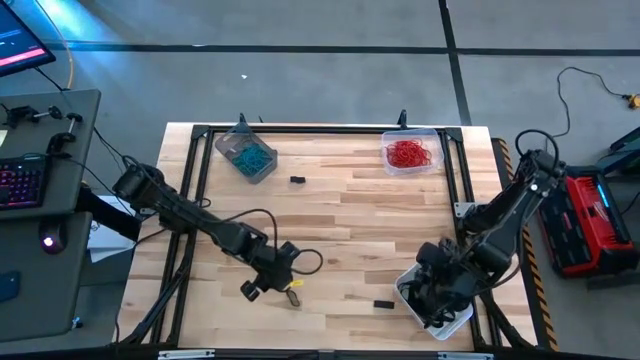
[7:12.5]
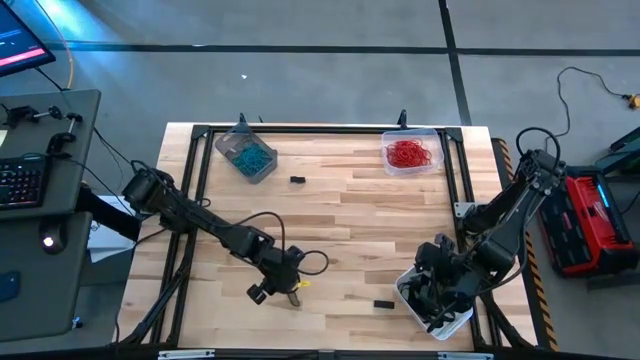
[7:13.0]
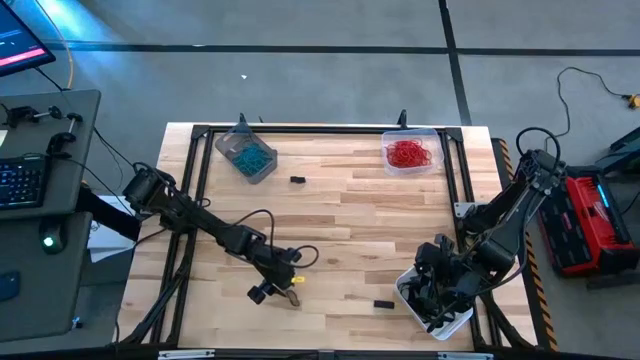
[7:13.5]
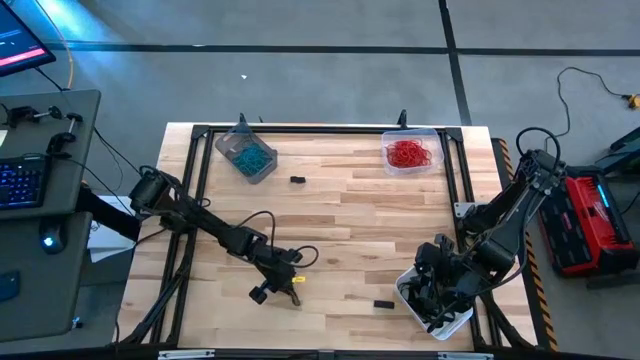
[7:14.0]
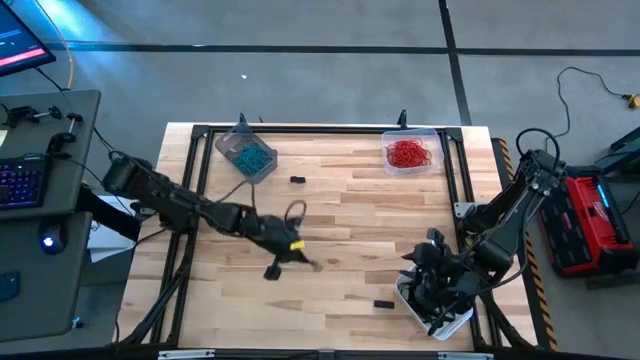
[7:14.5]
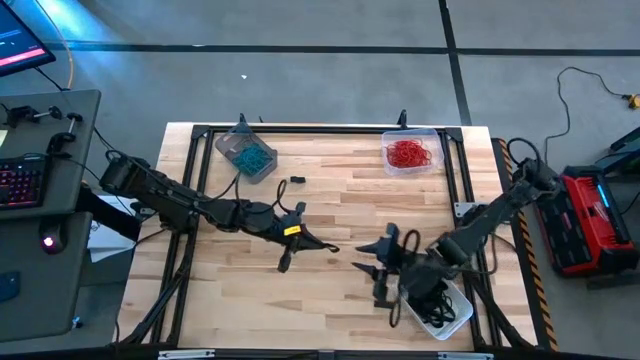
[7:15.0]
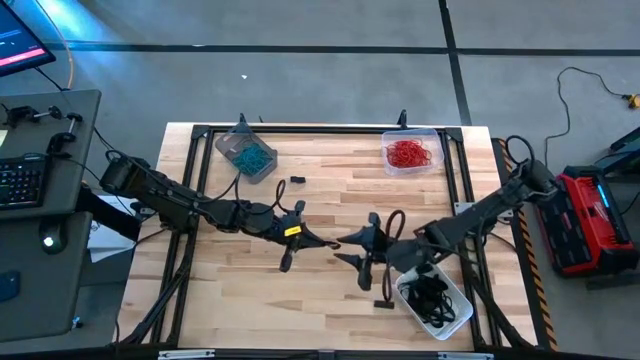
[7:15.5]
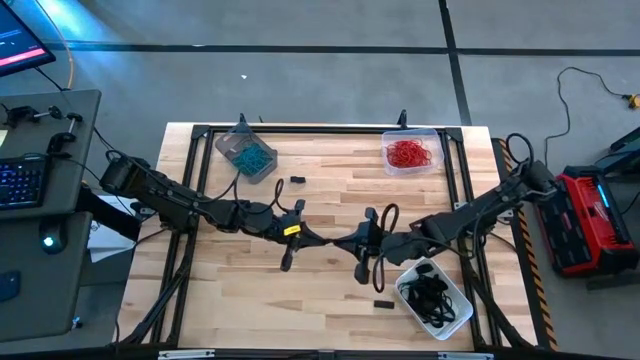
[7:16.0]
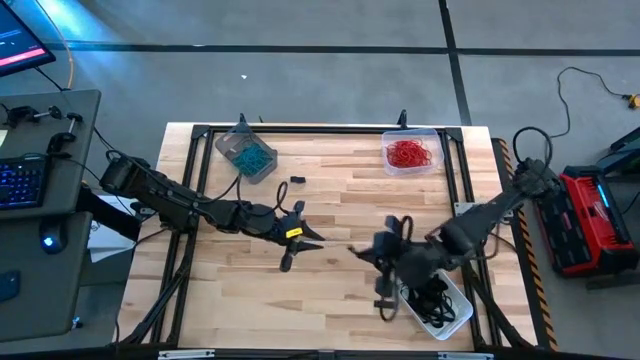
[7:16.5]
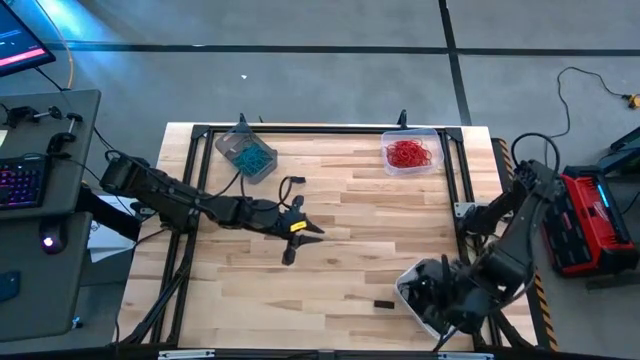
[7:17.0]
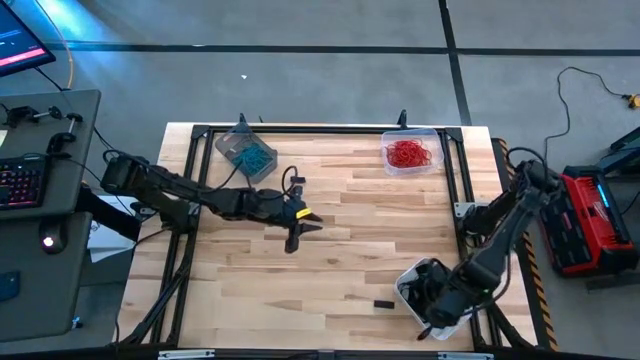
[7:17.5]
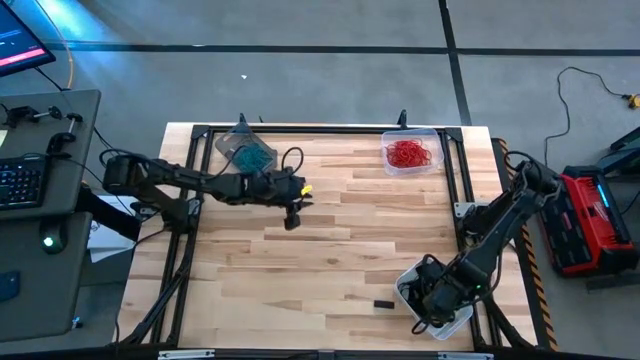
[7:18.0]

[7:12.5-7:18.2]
Task: Sort rubber bands into baskets
Put the black rubber band into the white bin

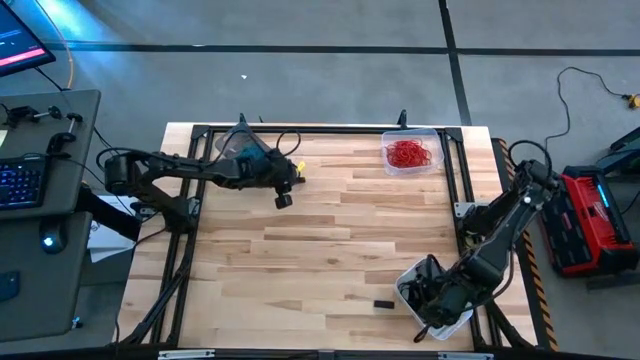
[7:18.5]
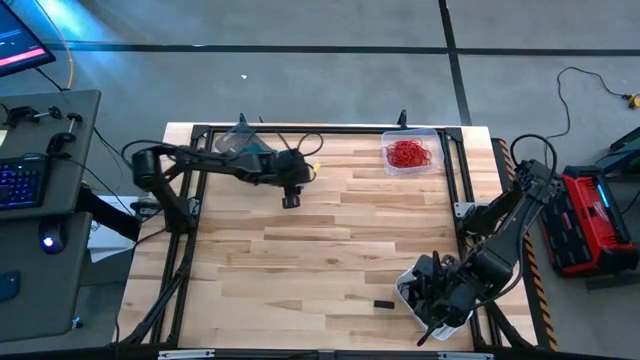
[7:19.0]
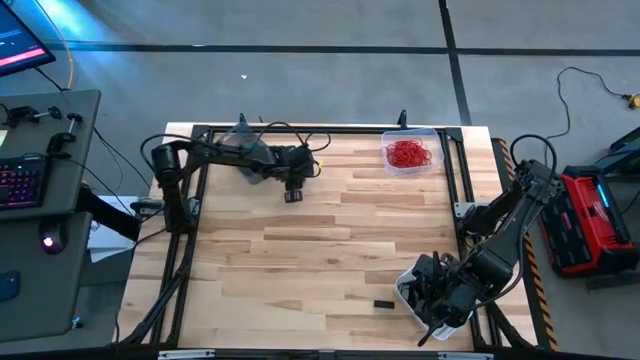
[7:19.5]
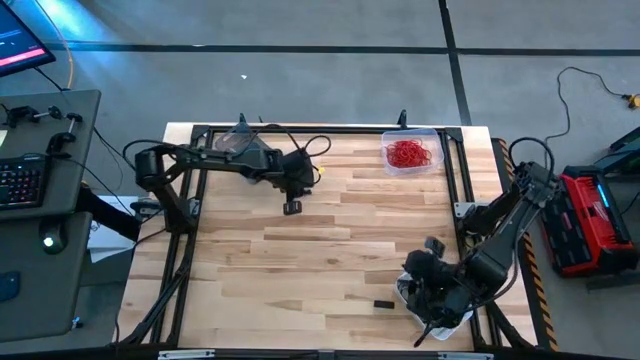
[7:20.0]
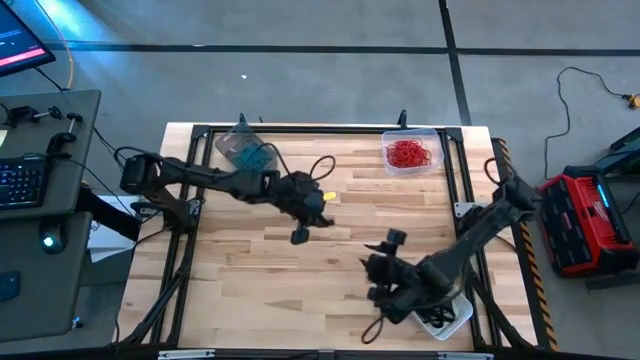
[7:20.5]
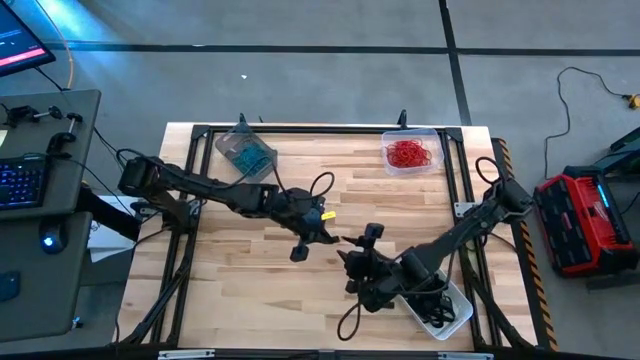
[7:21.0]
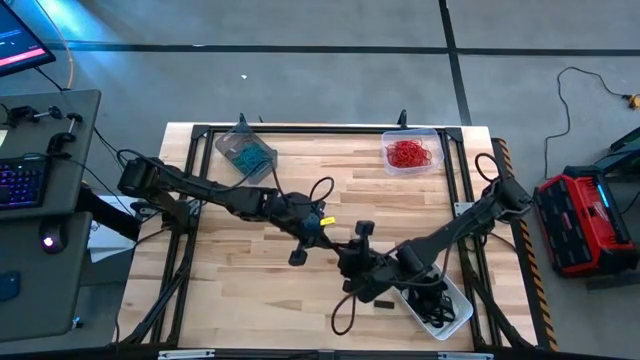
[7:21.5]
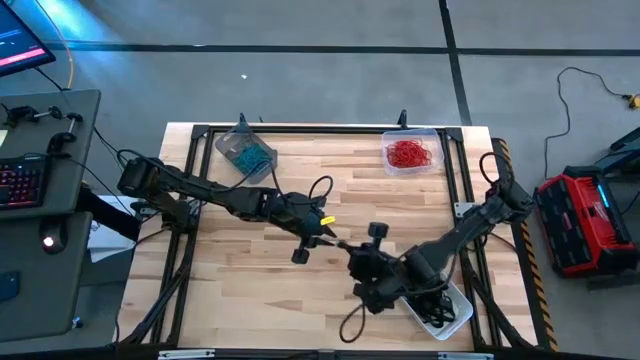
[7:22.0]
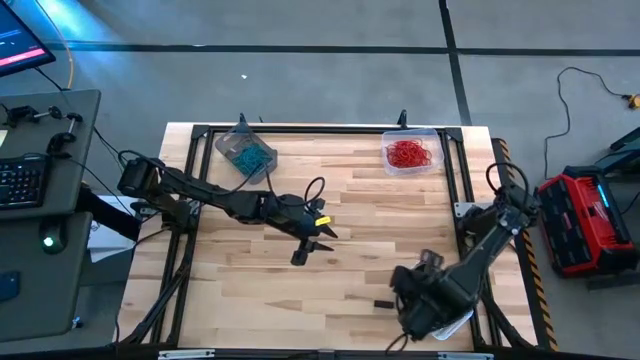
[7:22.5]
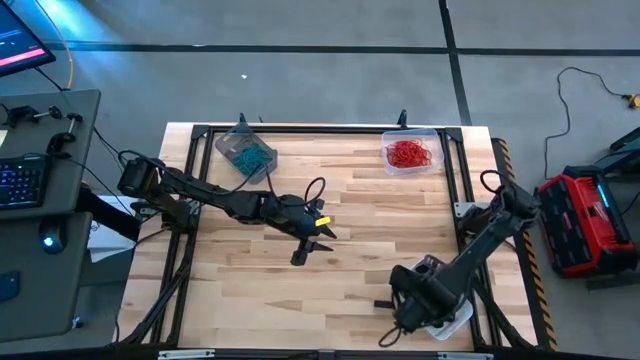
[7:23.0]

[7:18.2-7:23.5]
Put the black rubber band into the white bin

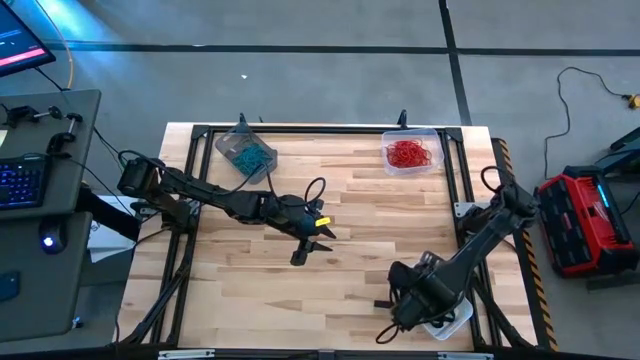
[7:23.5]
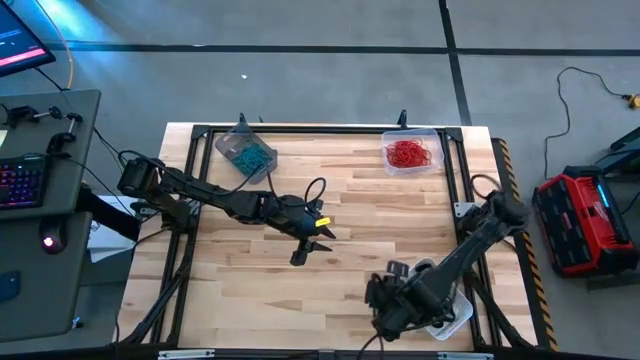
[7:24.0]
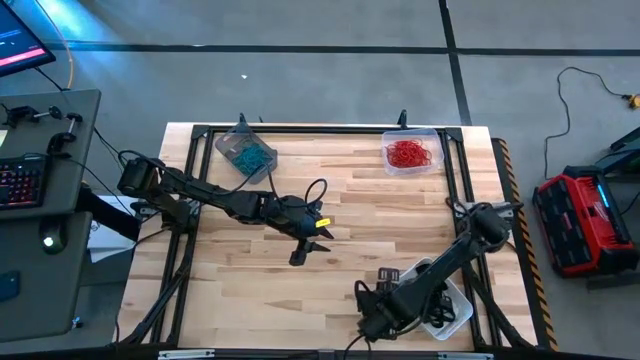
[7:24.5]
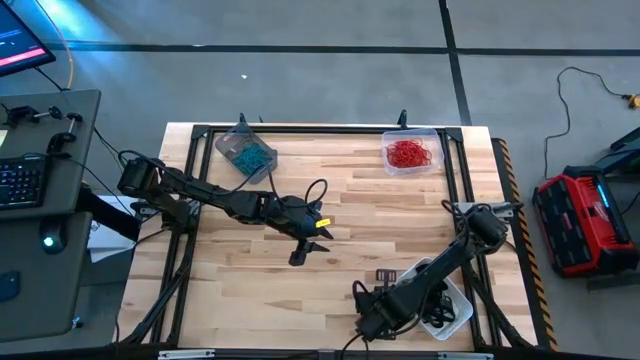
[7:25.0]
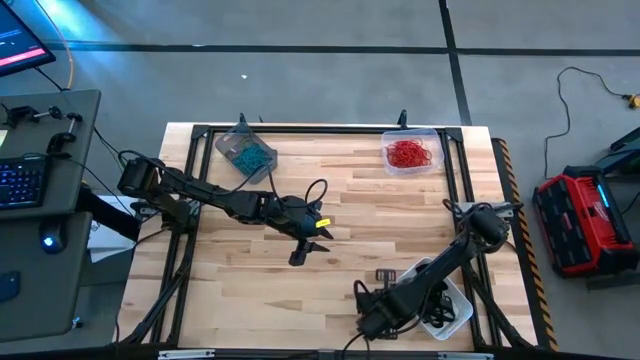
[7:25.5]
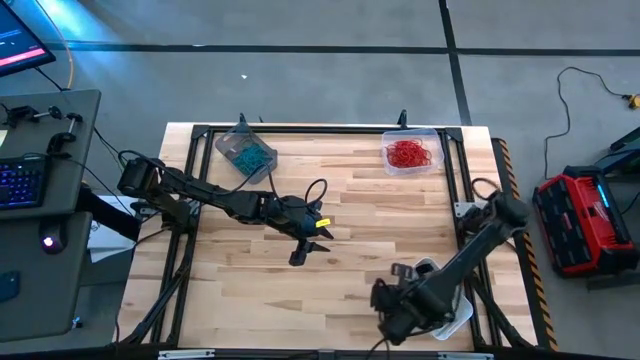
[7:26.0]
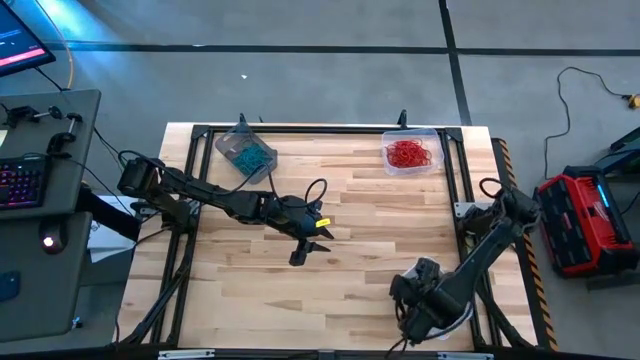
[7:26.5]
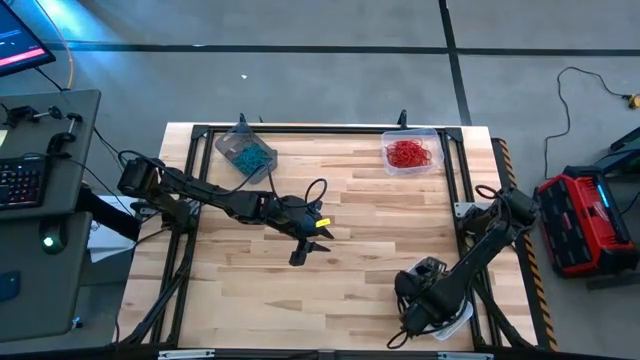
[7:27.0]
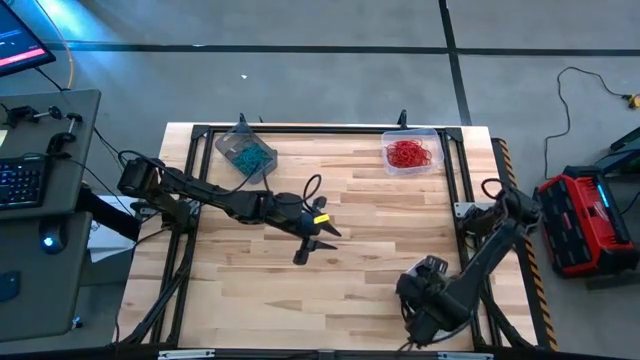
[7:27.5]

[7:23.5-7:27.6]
Put the black rubber band into the white bin

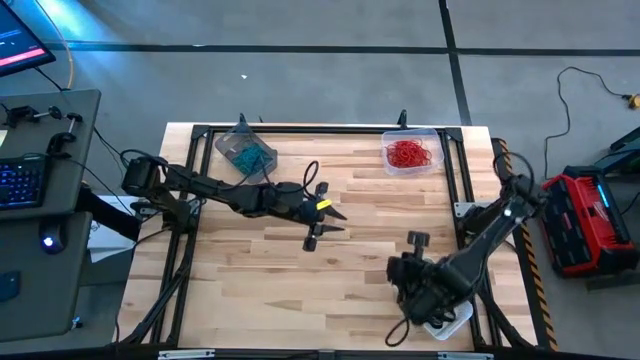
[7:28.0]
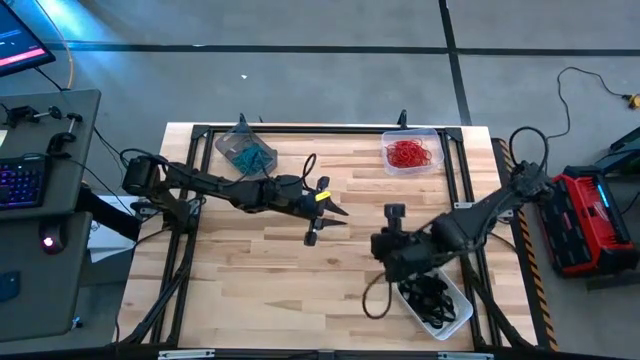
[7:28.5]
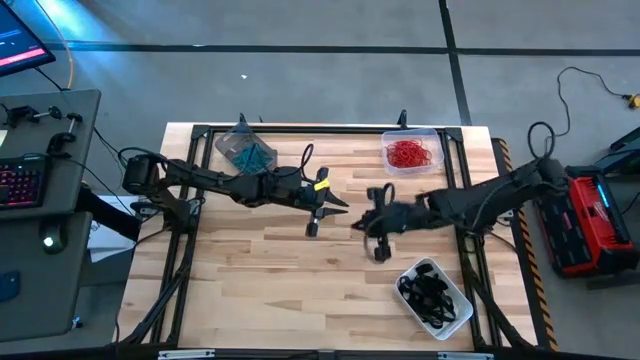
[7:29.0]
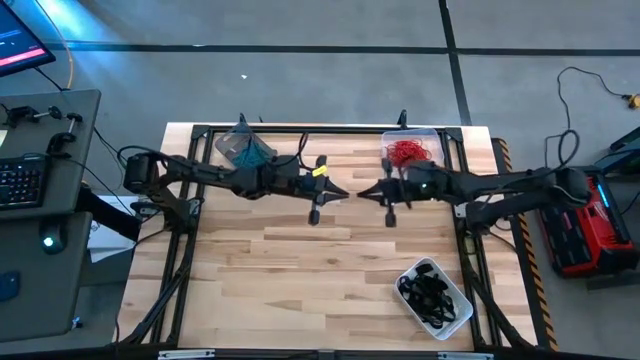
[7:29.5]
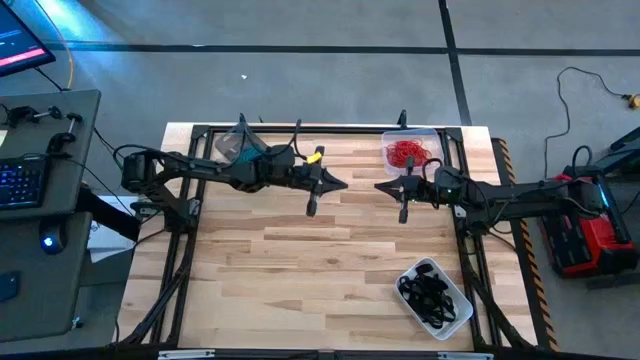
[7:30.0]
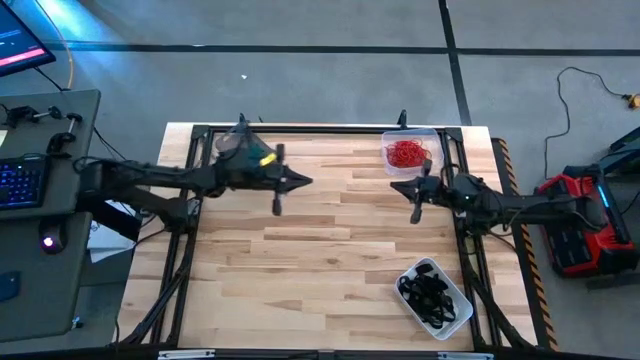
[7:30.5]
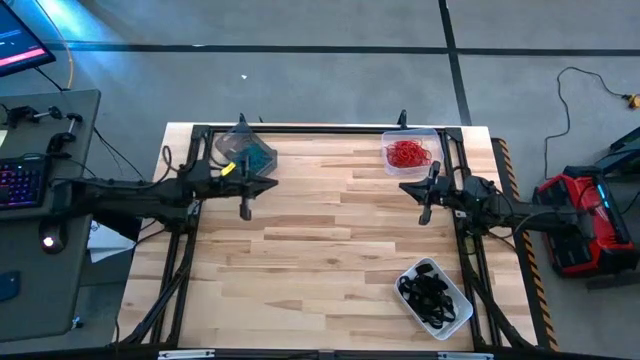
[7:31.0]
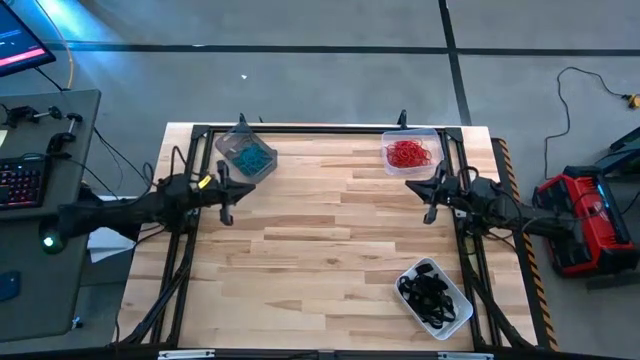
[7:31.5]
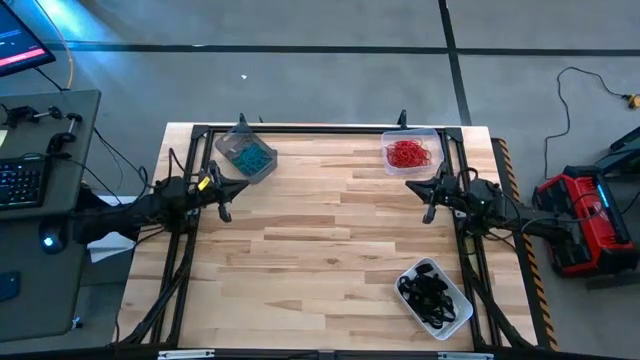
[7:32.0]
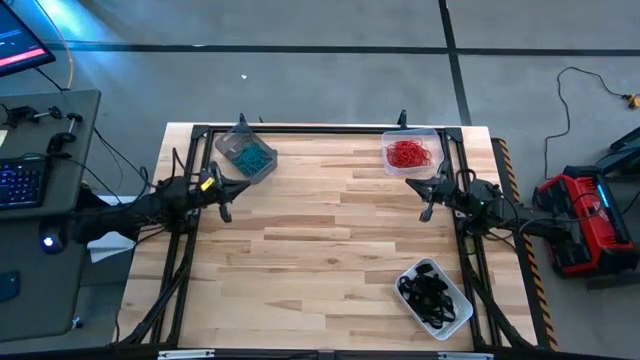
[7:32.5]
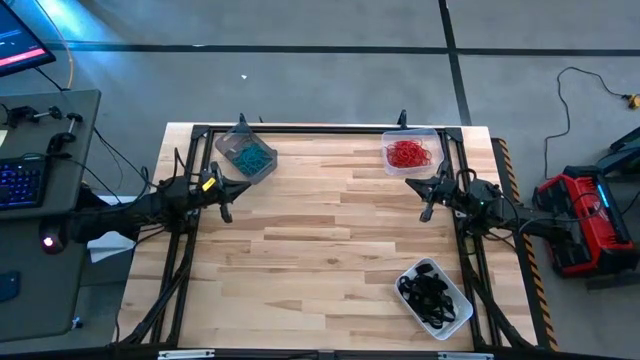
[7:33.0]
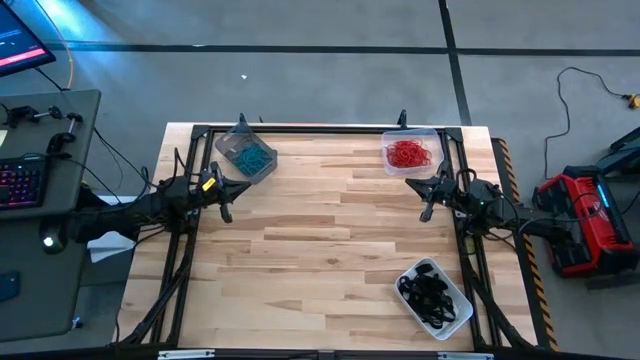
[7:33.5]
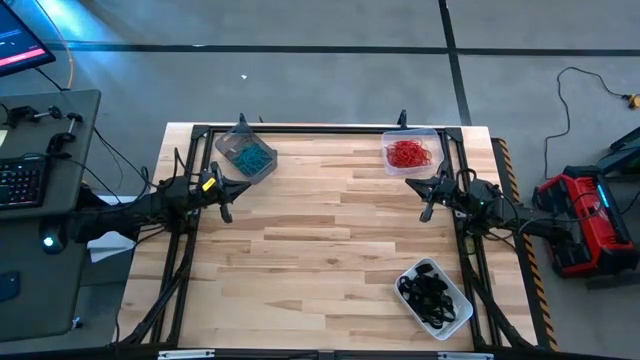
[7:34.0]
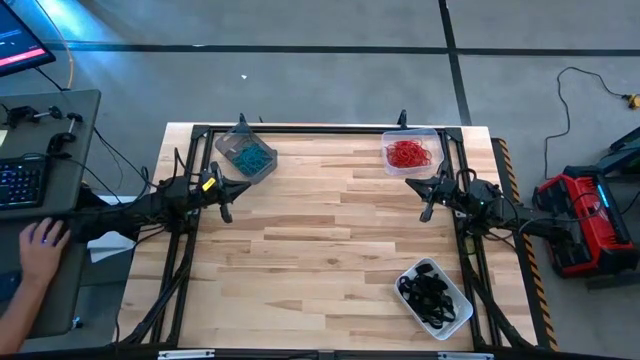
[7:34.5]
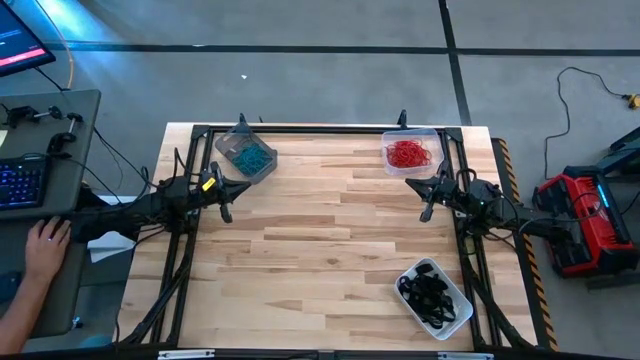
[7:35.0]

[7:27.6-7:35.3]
Return to Home Position
